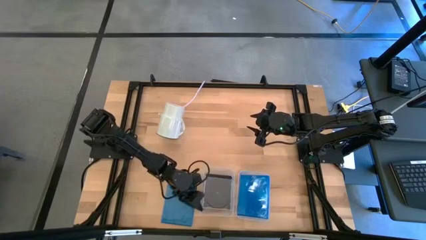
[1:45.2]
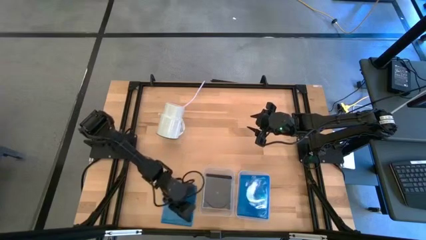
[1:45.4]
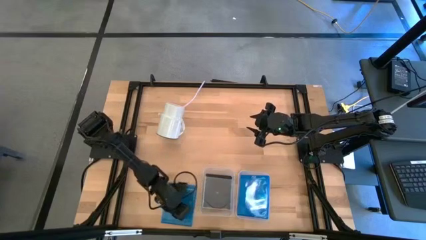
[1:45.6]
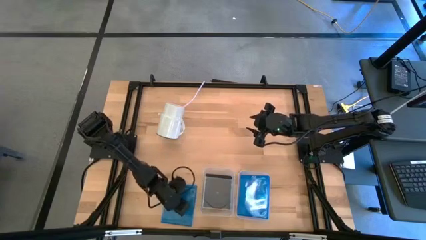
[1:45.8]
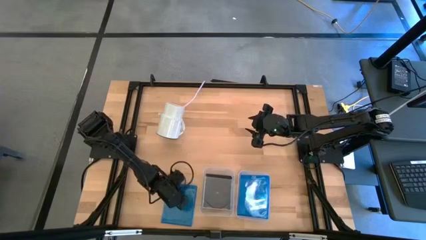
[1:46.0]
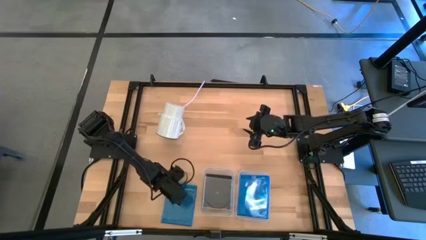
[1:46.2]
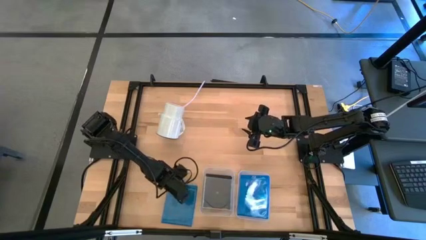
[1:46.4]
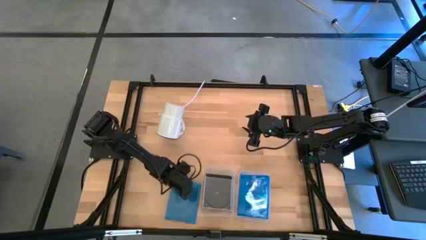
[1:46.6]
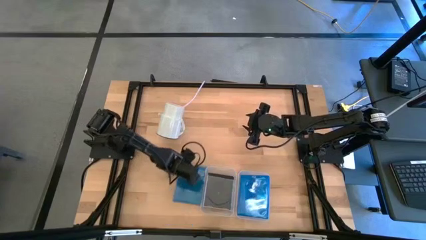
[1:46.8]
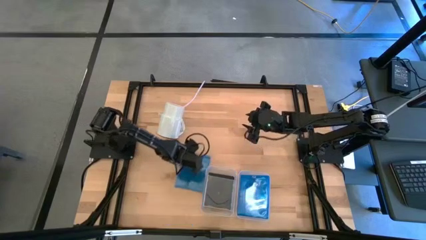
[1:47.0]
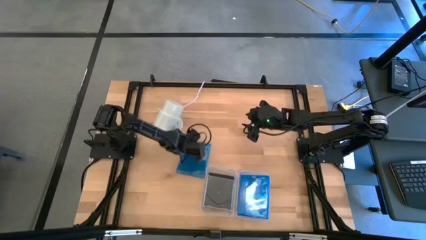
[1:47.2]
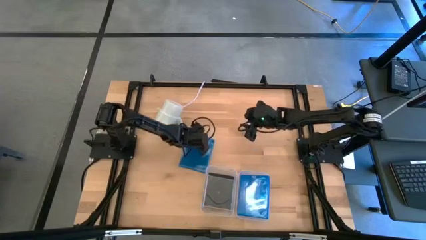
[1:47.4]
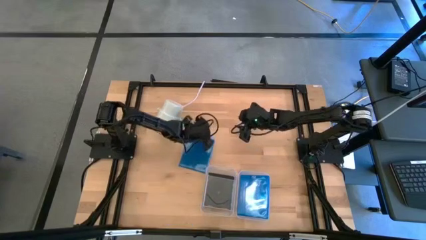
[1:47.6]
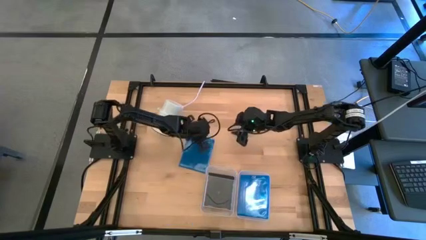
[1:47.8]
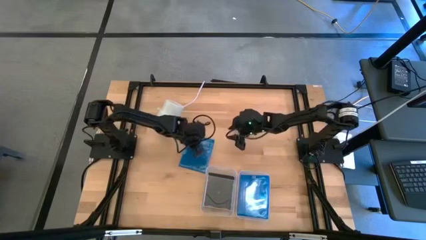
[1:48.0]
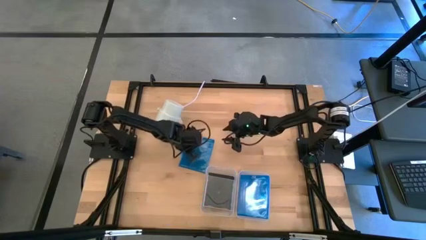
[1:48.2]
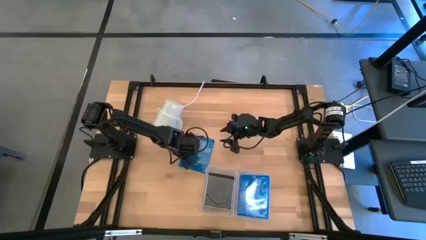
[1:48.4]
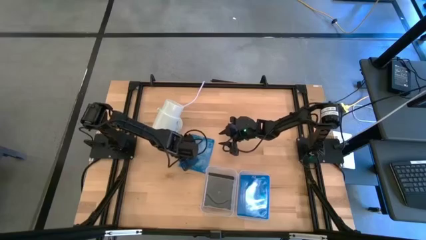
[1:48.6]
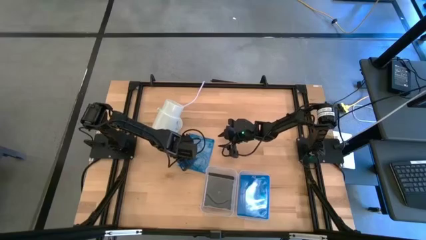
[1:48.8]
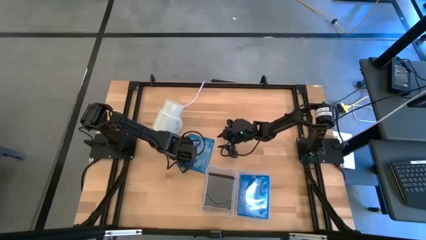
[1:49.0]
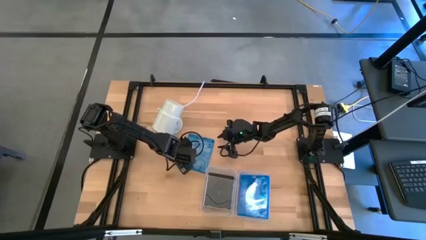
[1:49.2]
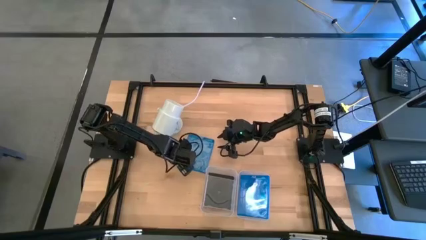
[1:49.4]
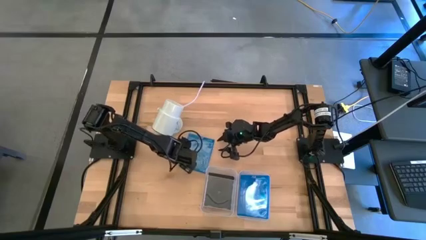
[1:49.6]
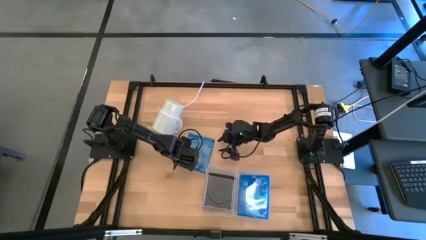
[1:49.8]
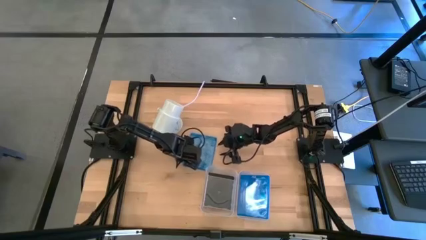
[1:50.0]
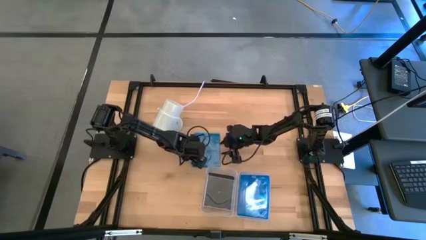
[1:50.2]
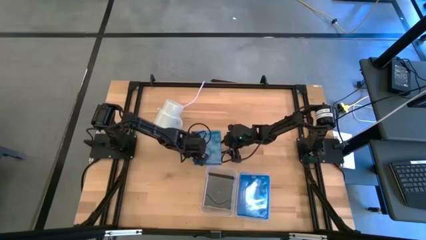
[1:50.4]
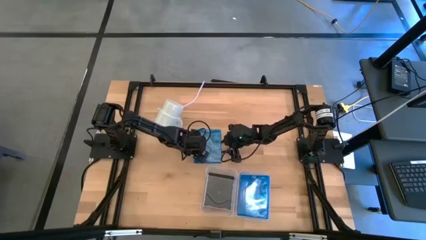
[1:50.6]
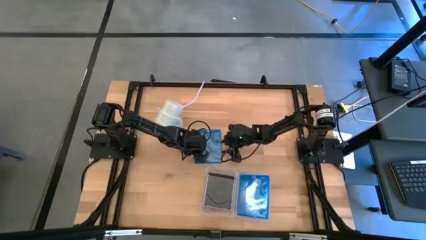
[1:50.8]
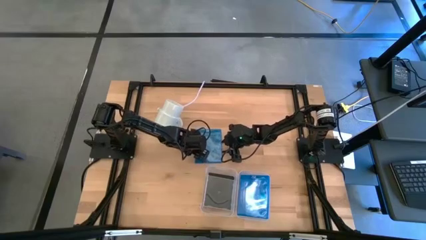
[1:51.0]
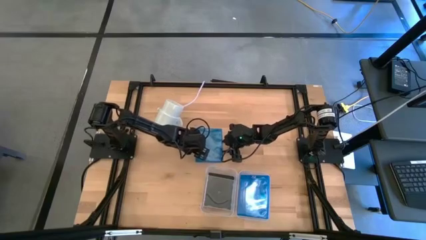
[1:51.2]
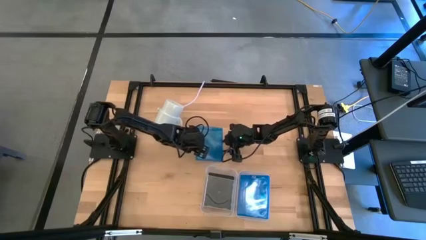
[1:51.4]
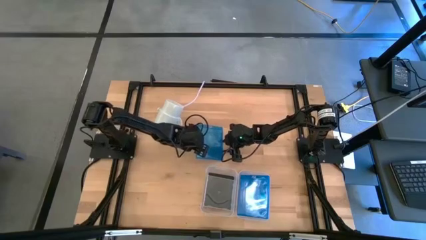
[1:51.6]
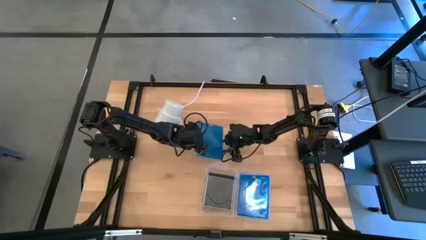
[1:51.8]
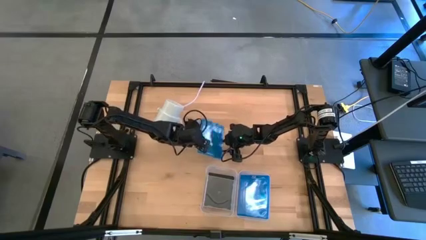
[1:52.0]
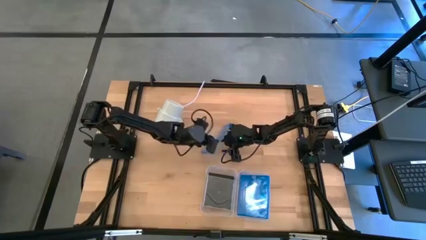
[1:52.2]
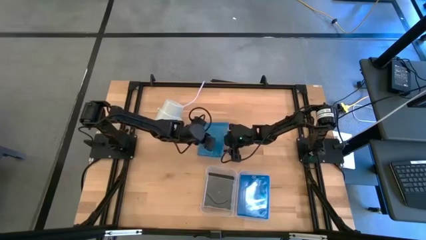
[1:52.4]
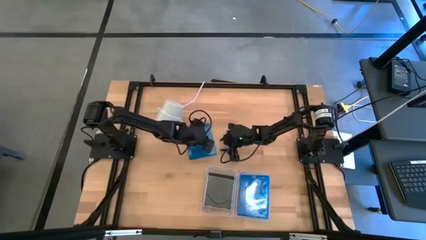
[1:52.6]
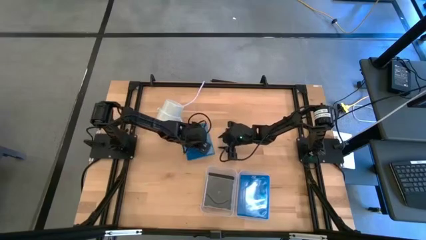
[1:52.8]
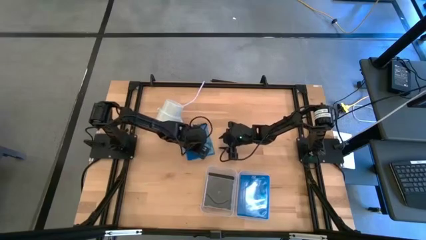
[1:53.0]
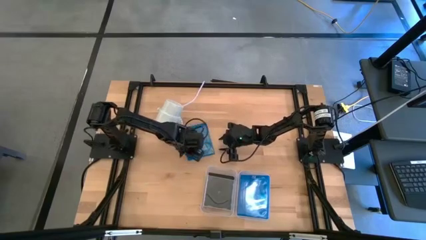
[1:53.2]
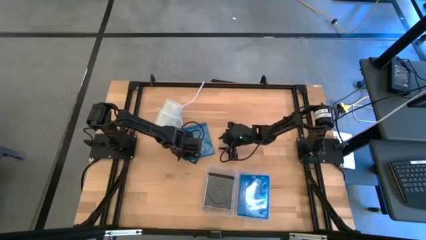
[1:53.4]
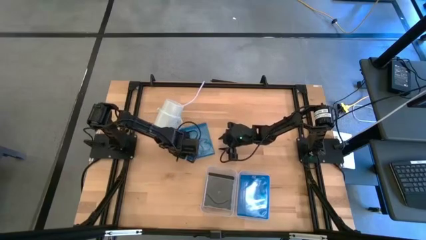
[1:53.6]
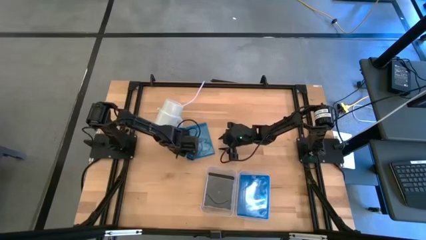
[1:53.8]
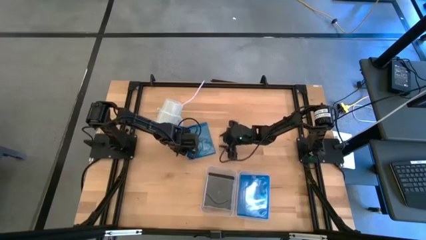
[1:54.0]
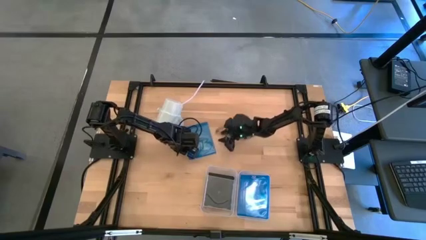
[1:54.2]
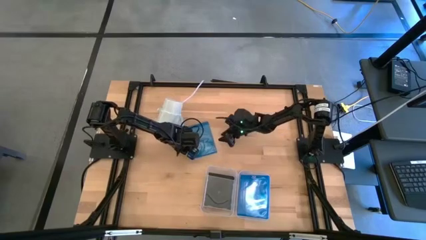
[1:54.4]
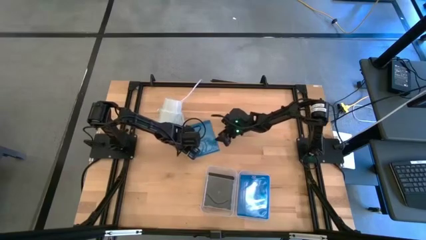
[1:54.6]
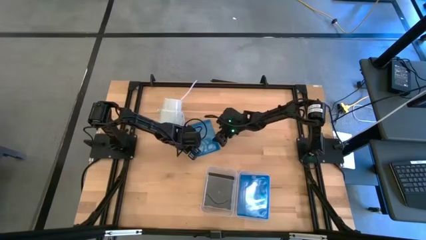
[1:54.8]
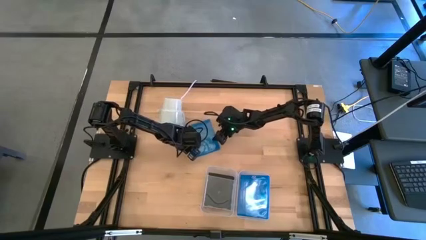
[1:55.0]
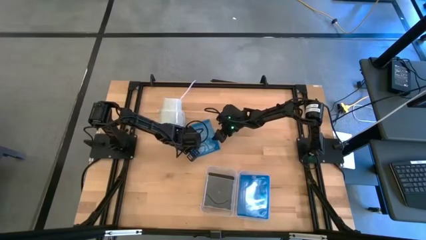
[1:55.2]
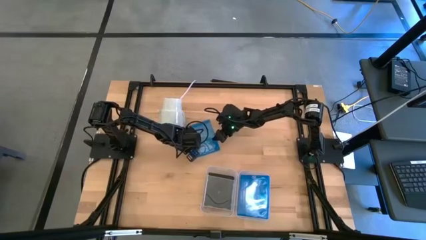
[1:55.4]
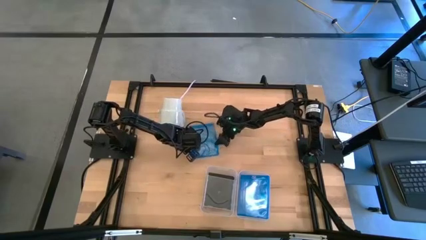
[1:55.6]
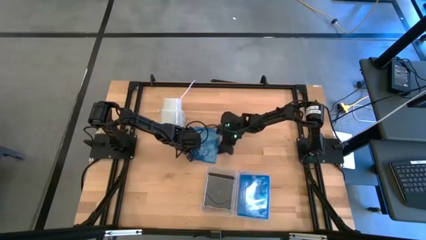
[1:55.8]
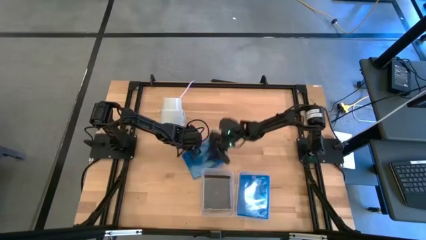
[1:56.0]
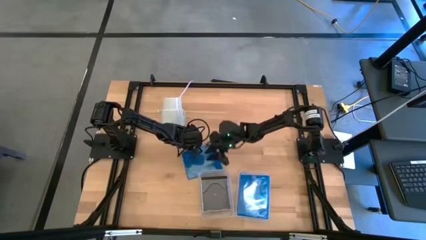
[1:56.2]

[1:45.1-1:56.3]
Task: Pick & place jewel cases by type
Put the blue cd case into the right transparent bin
